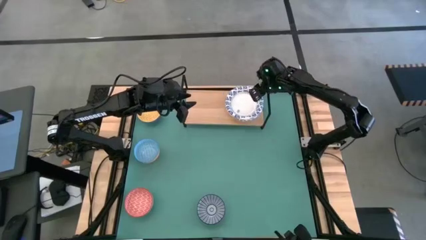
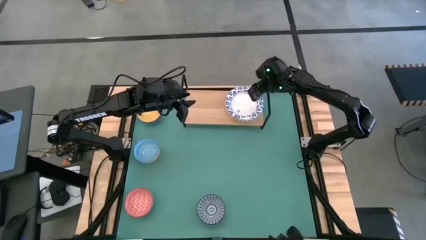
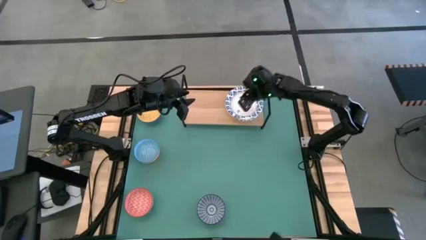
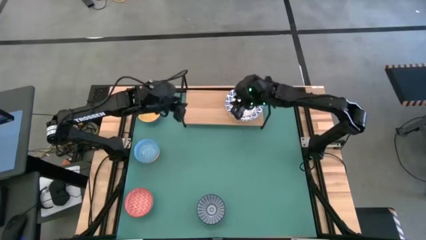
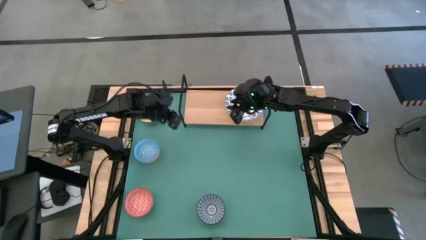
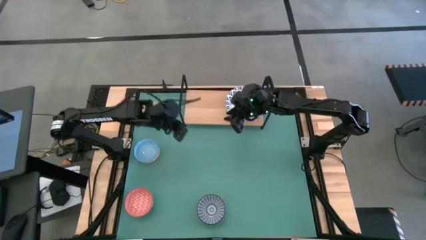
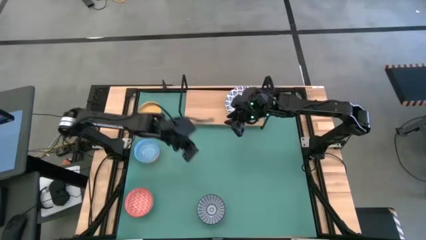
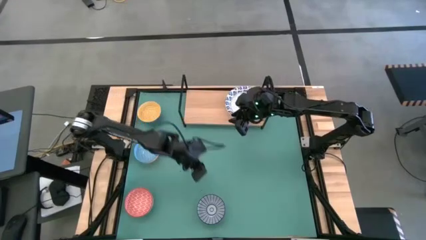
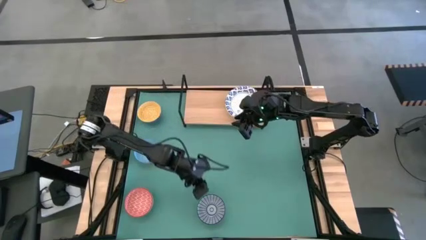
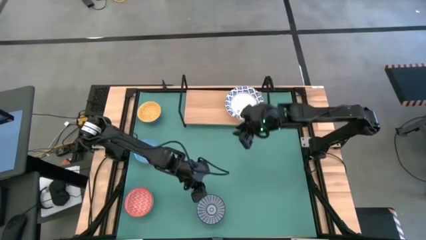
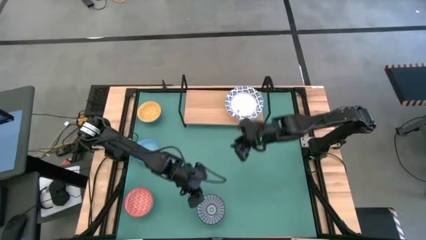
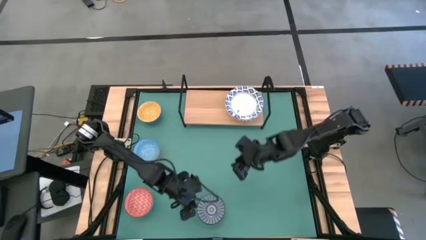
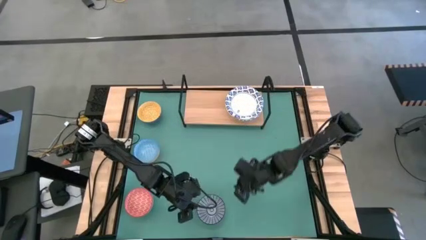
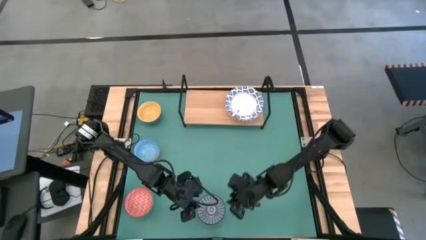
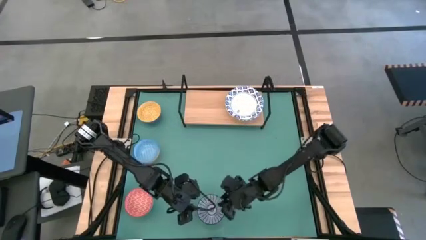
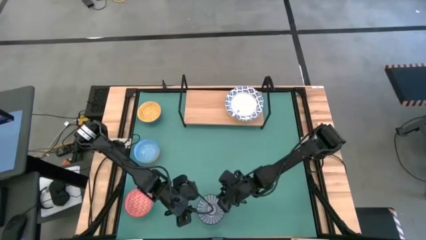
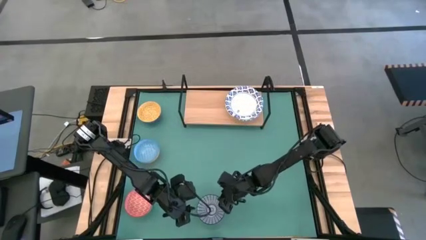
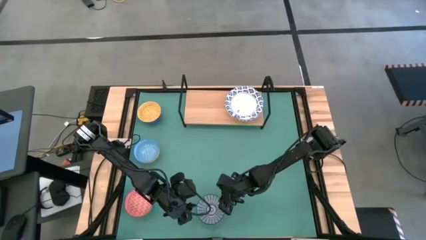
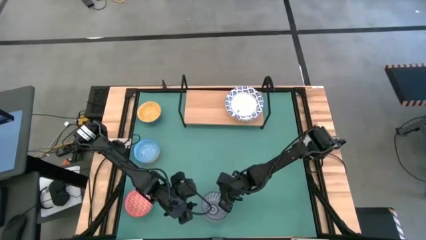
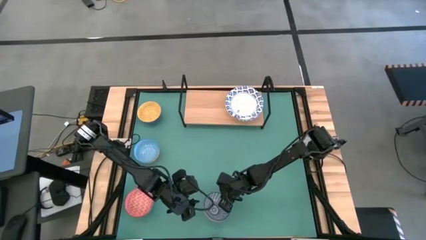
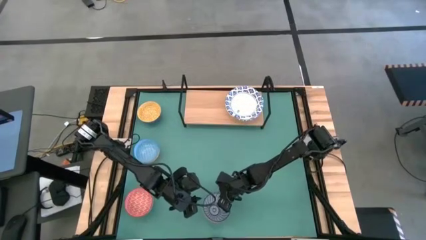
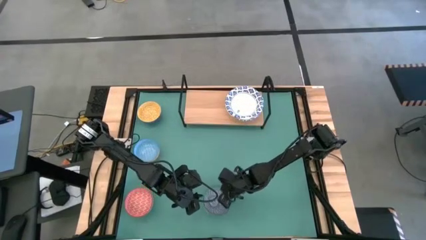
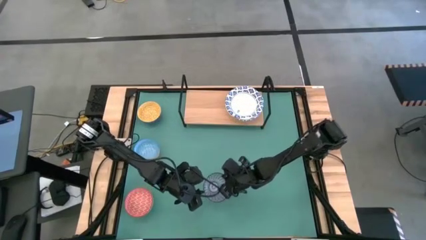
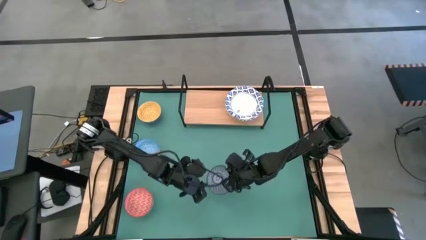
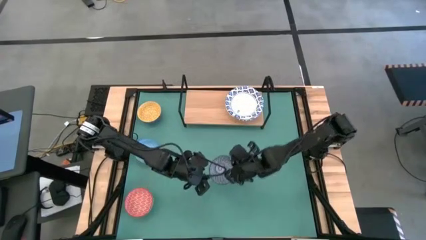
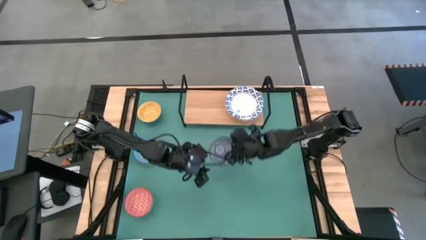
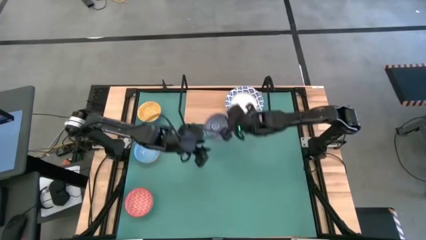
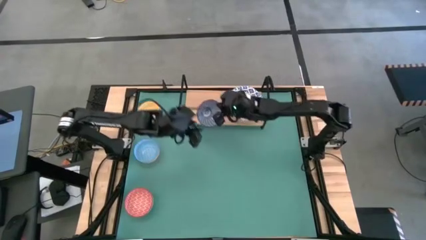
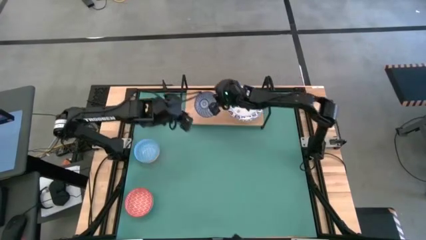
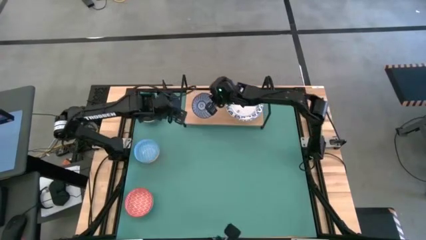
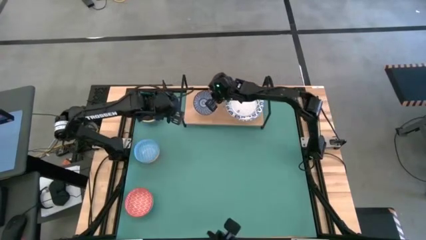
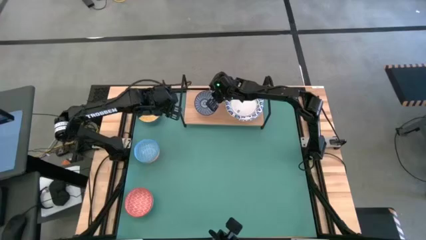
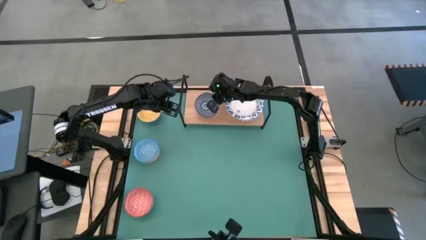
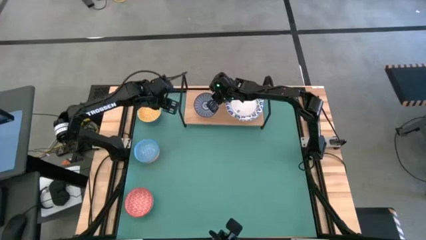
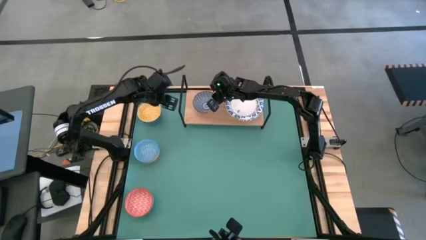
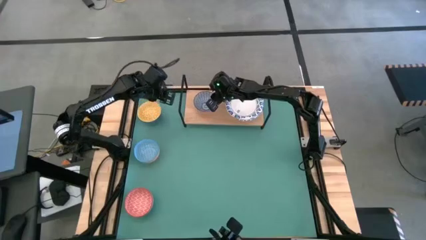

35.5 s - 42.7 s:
Task: Place and stack bowls onto a shelf
Put the blue striped bowl on the shelf

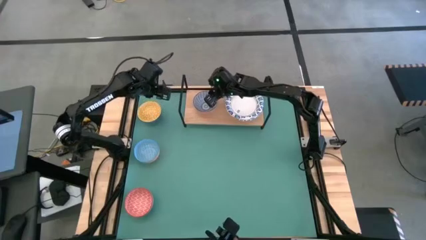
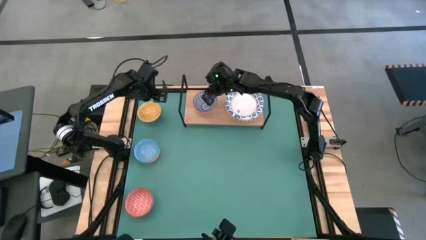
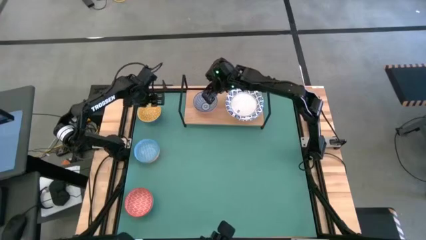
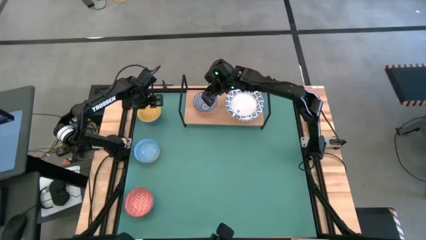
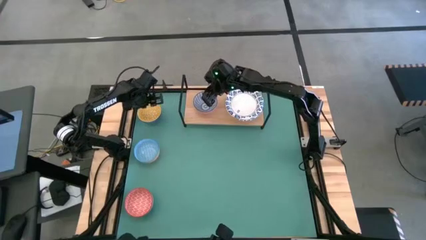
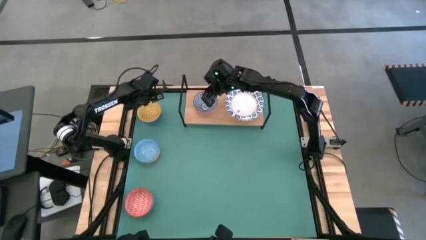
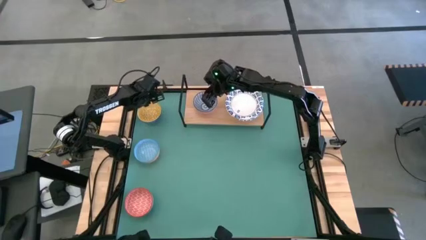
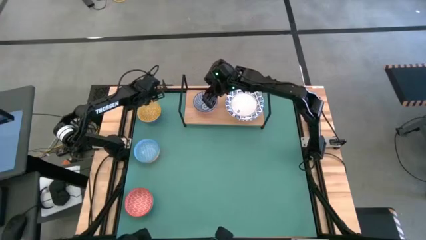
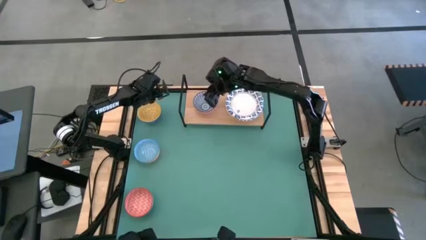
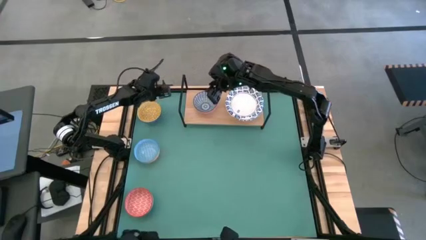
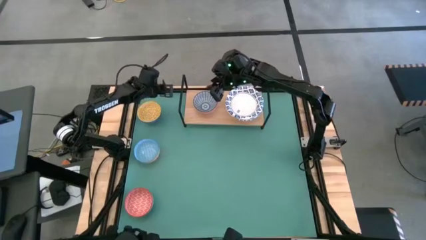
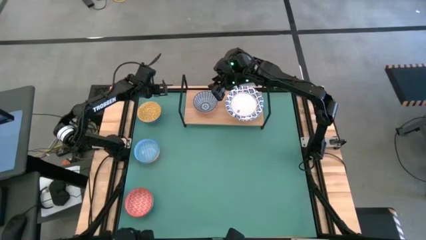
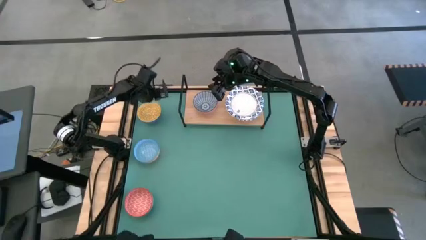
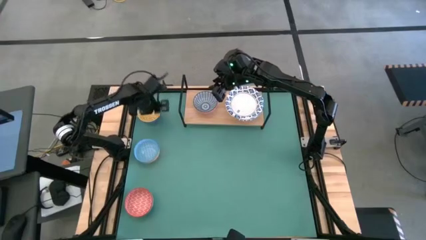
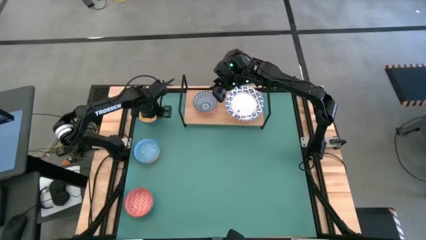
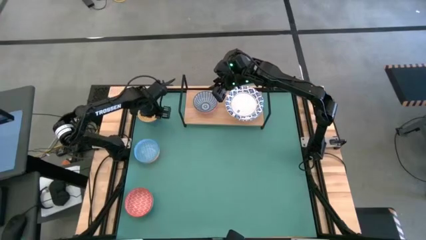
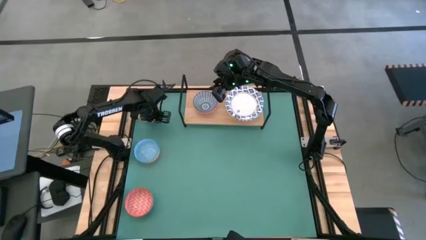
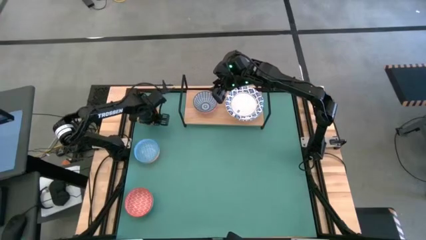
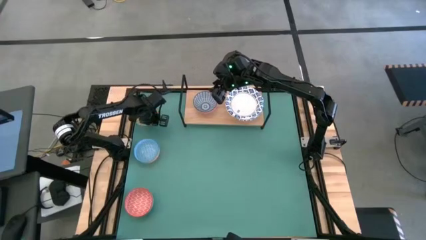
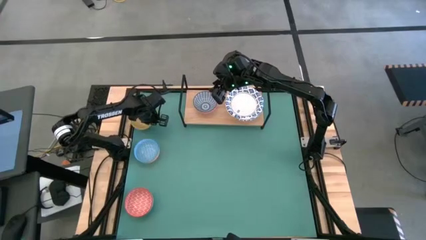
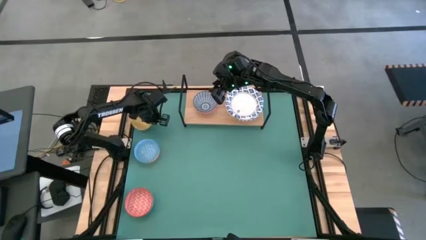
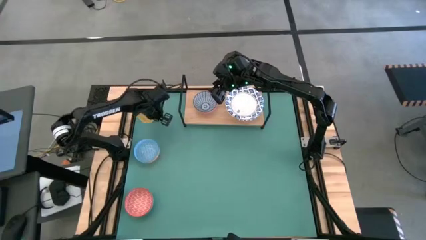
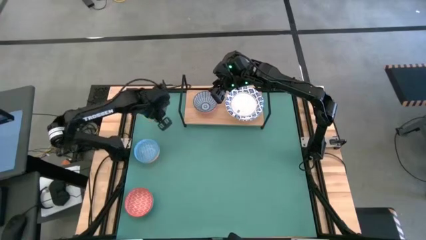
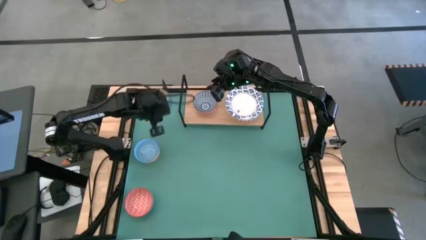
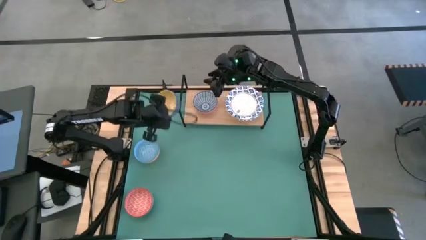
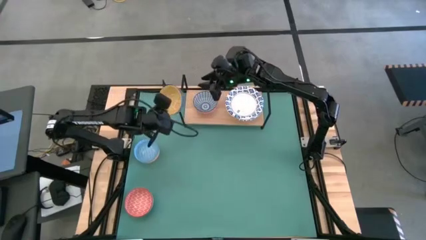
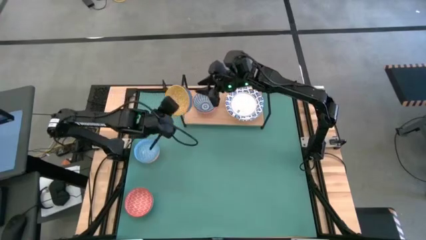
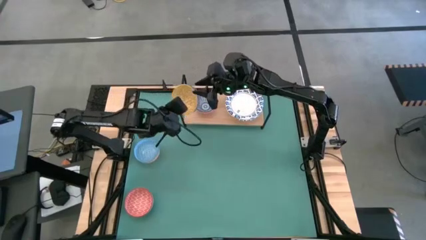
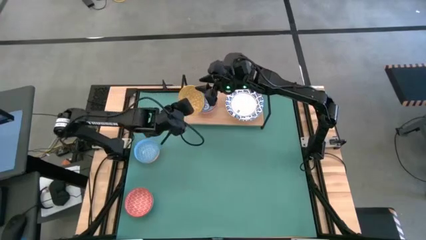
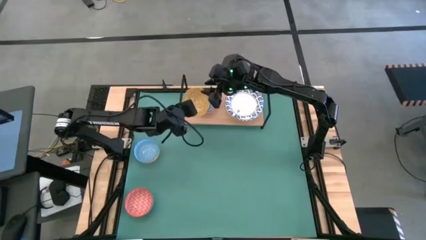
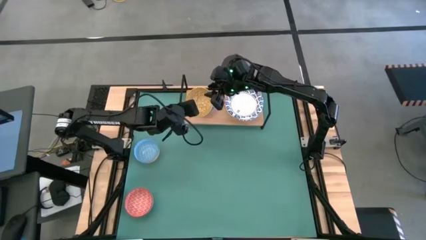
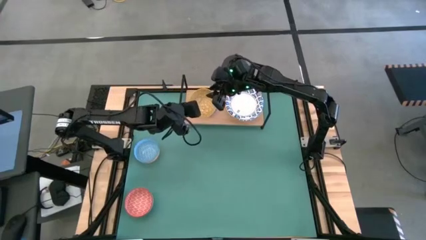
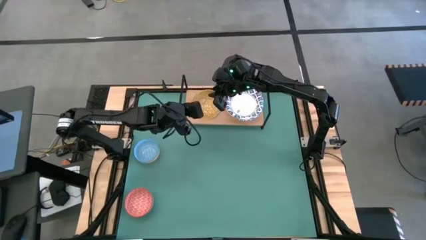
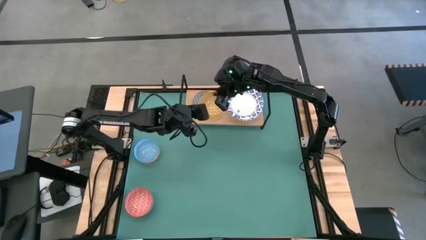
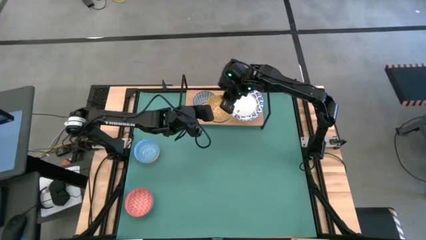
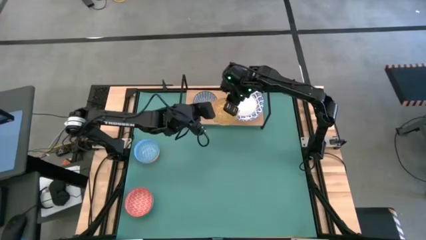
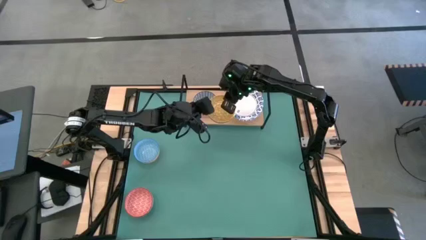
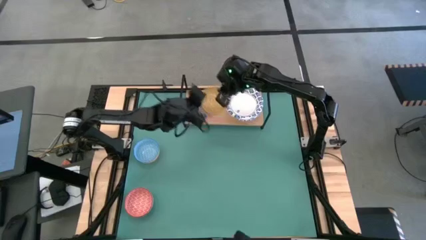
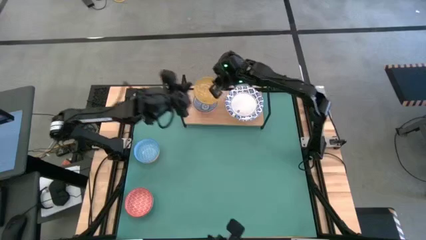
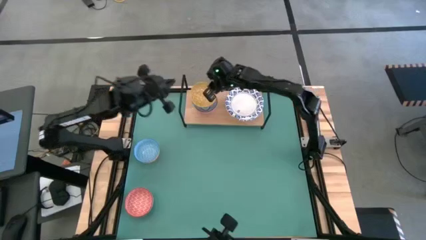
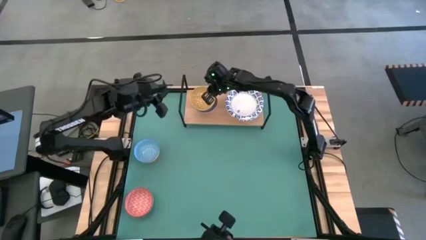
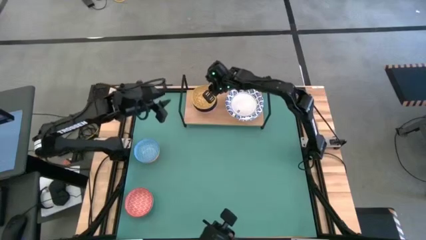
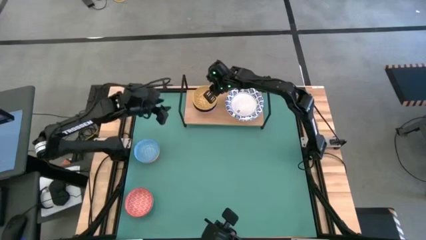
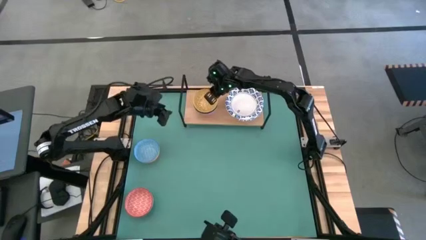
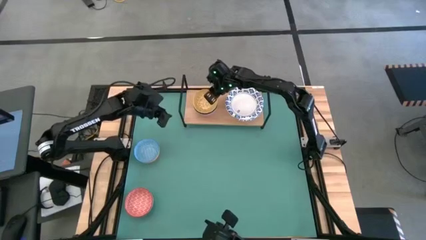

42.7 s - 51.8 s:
Stack the yellow bowl on the blue striped bowl on the shelf
